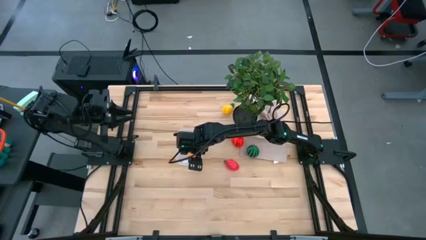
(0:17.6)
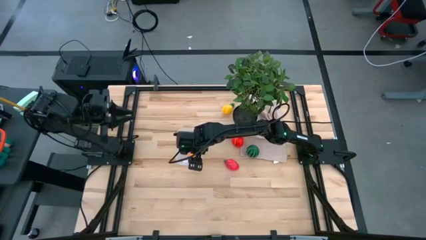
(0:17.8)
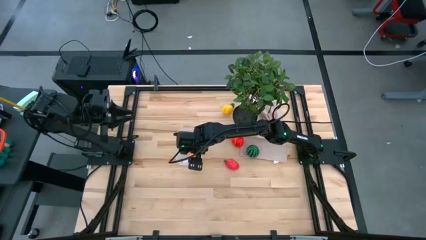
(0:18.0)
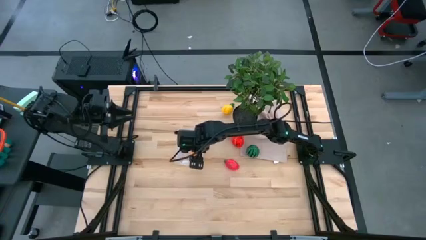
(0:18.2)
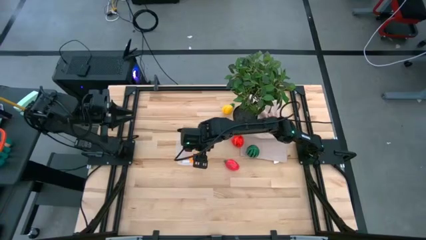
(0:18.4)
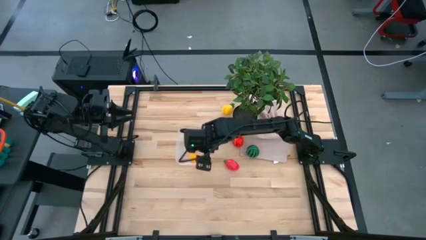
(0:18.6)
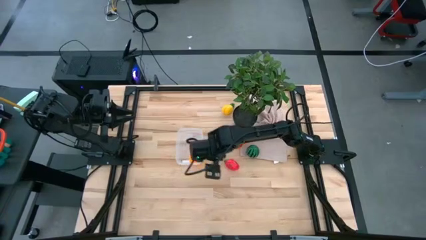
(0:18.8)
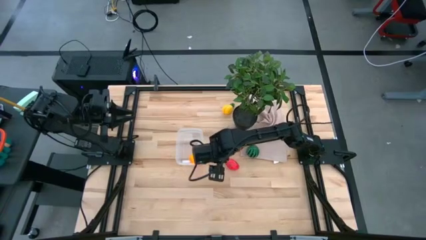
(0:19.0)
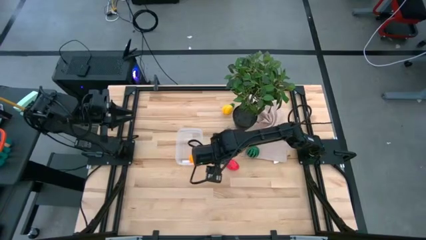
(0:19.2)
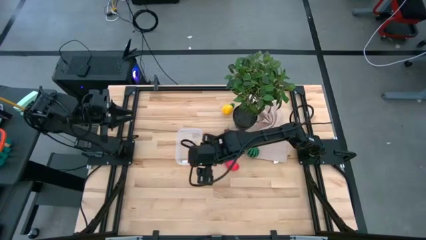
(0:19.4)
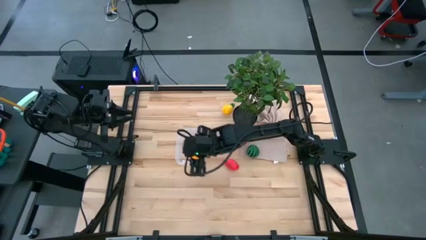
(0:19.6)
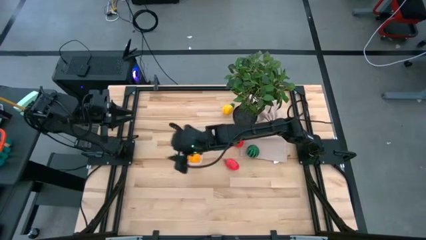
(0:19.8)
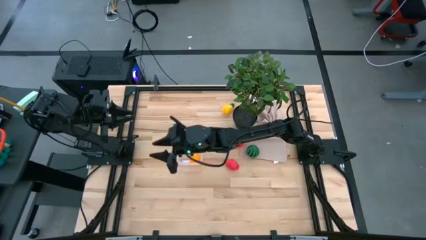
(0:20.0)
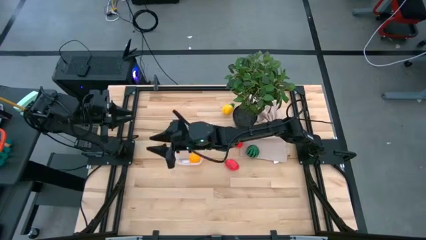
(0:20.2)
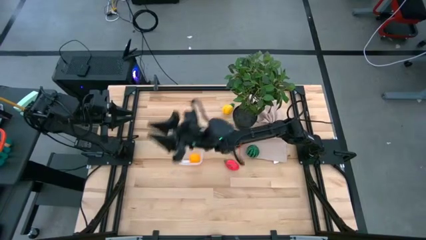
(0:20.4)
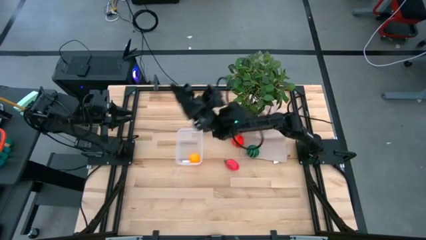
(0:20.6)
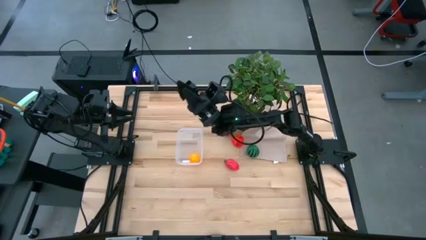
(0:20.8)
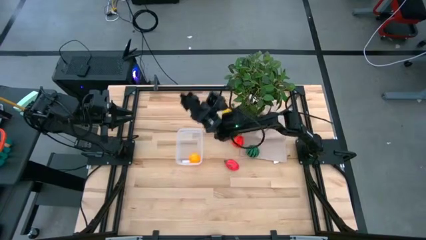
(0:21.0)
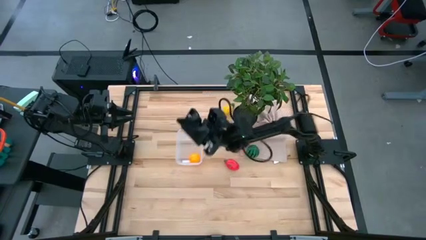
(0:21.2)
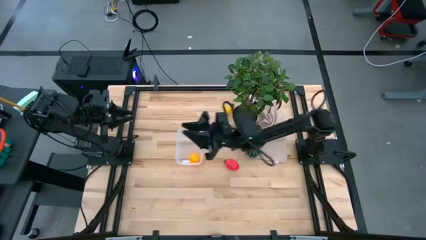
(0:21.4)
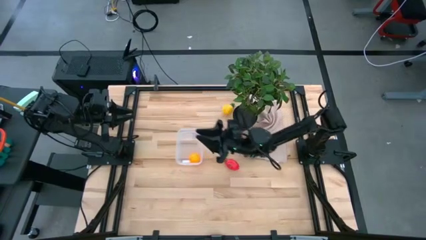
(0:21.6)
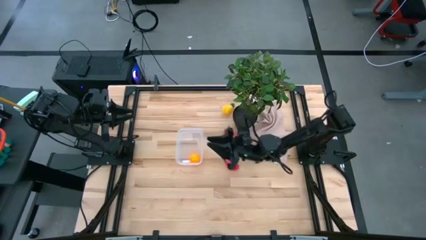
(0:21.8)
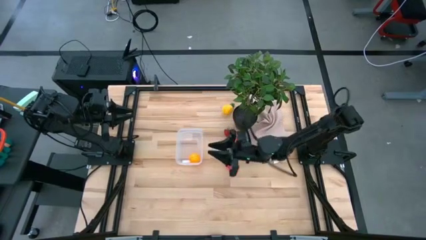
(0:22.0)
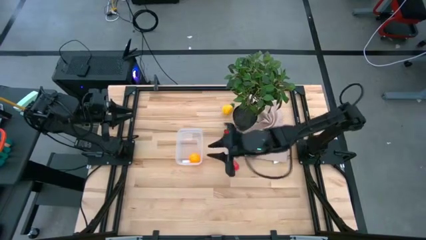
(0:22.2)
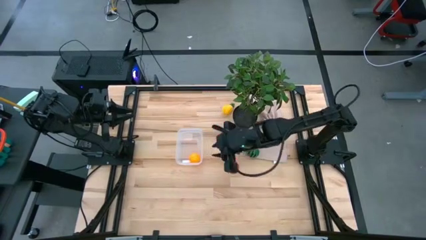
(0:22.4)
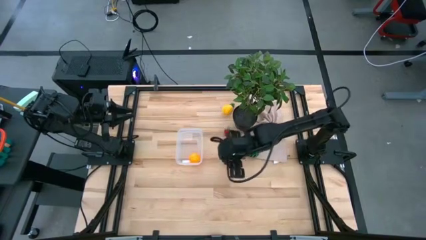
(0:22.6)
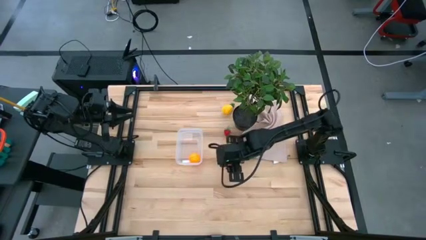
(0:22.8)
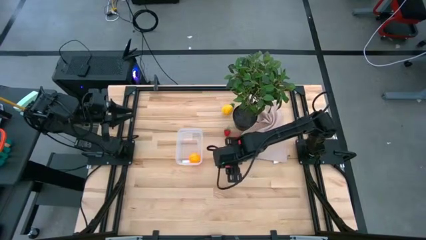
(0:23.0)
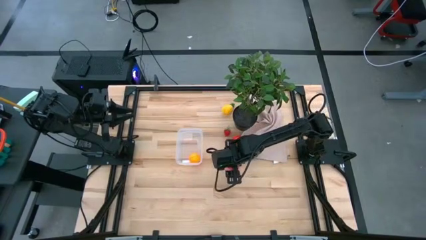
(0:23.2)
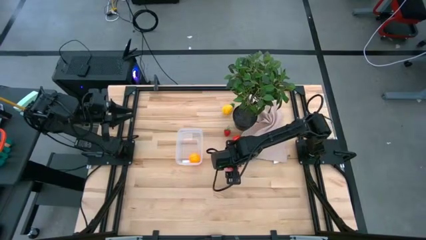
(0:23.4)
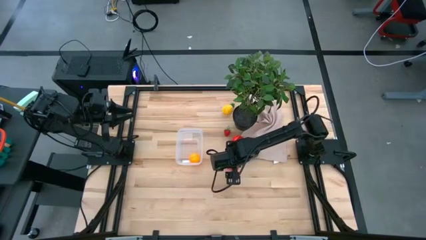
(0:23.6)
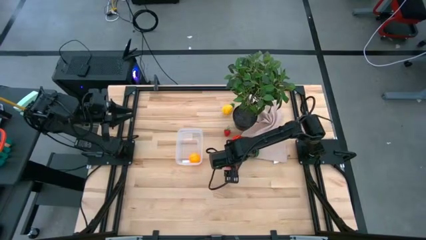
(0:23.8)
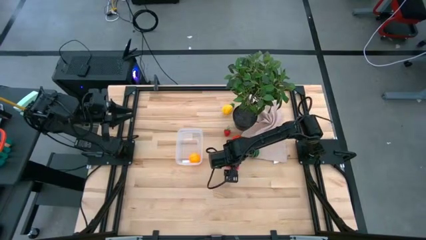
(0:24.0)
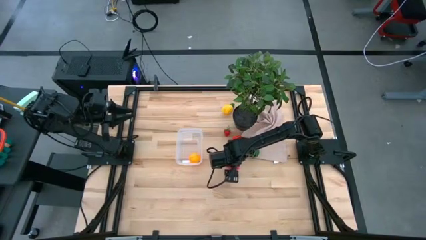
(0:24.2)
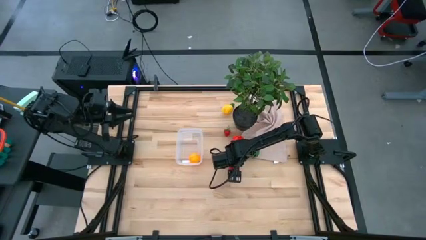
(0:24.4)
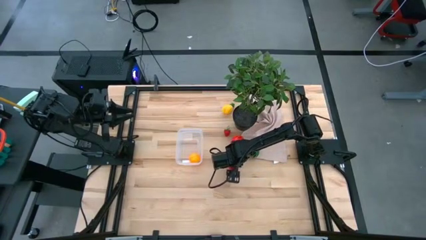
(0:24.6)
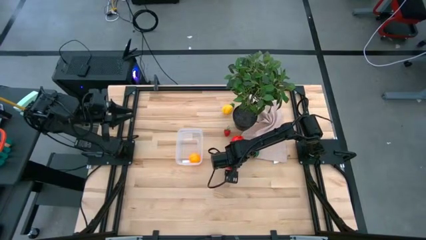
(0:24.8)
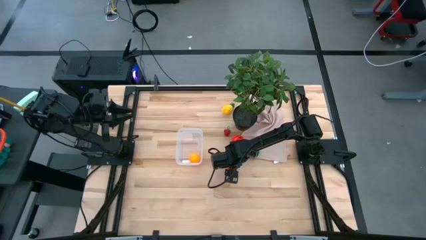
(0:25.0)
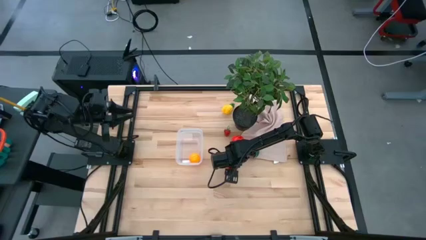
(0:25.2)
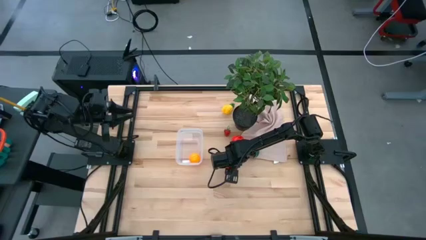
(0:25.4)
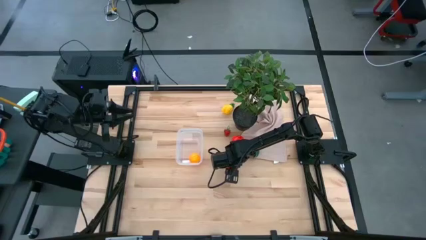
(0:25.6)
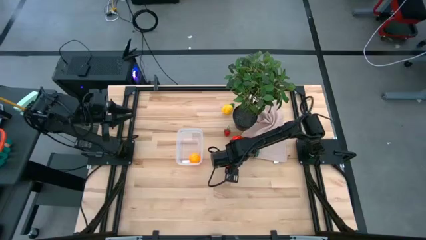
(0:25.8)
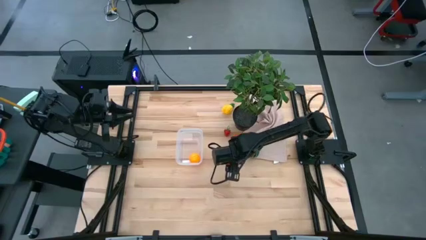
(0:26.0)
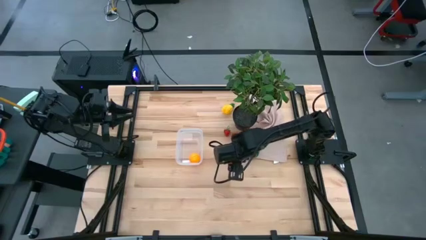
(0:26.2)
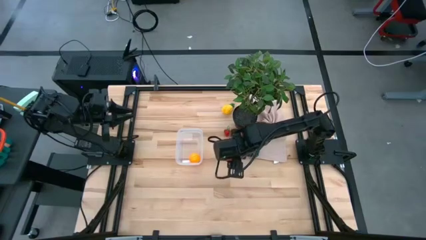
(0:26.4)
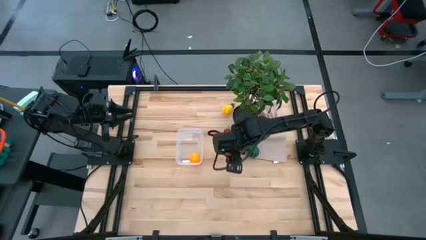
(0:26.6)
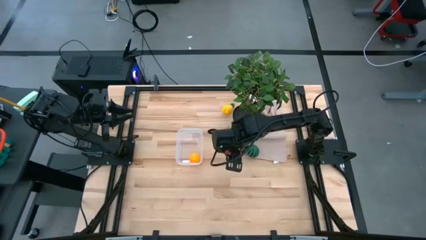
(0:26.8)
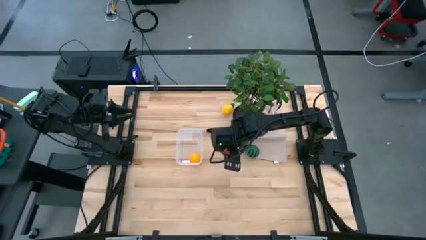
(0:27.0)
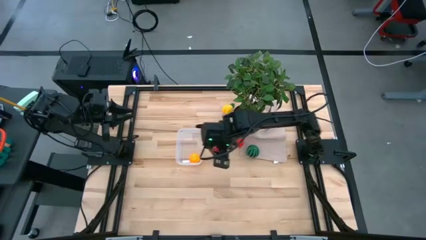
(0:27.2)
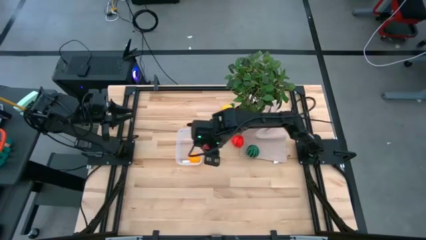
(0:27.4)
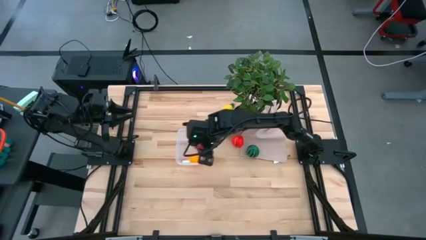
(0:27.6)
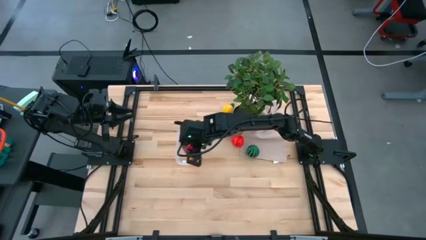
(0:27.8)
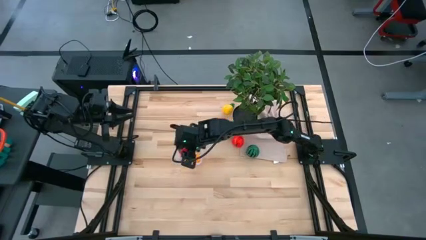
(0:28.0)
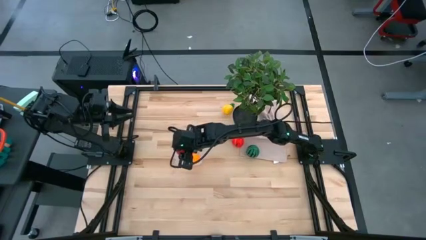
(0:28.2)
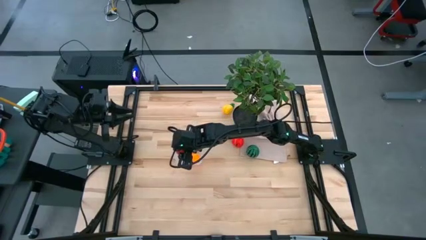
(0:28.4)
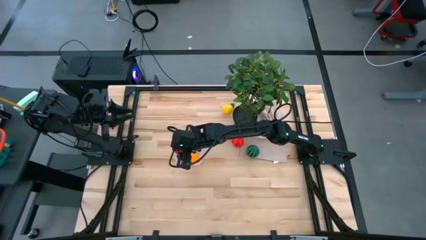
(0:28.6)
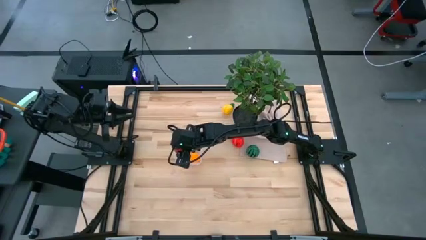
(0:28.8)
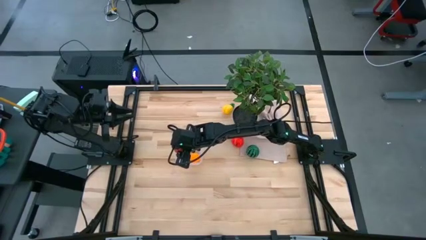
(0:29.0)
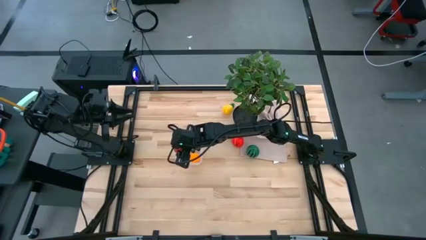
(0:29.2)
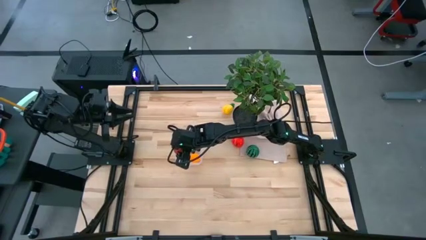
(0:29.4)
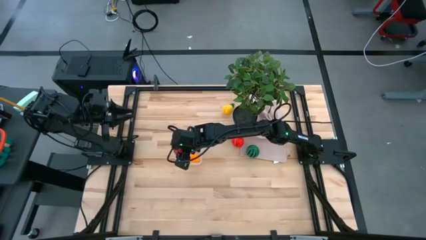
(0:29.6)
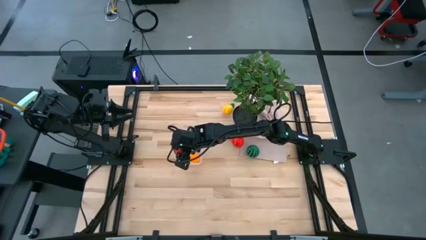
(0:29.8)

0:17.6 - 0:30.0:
Task: Pick and placing Produce into tupperware
Put the red dragon fruit into the transparent bin

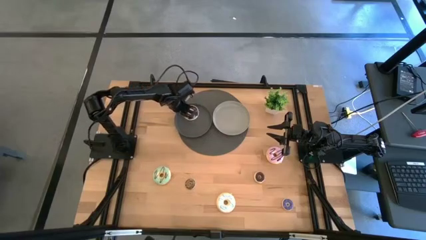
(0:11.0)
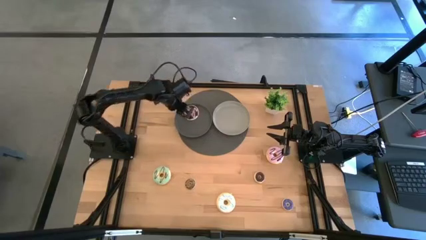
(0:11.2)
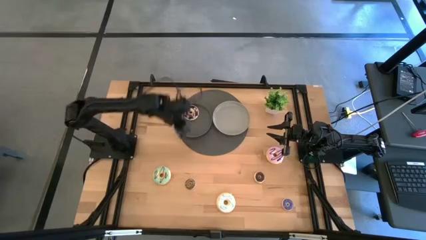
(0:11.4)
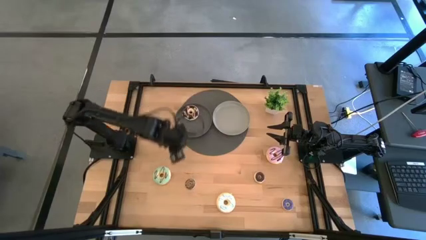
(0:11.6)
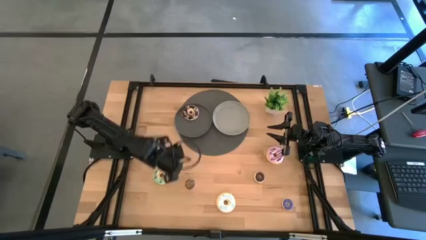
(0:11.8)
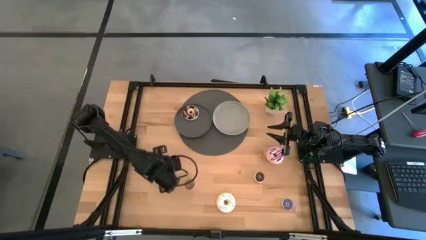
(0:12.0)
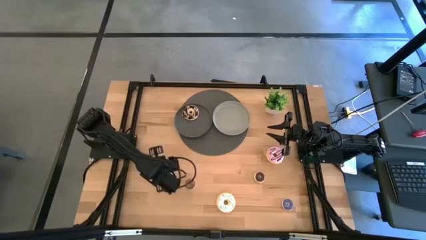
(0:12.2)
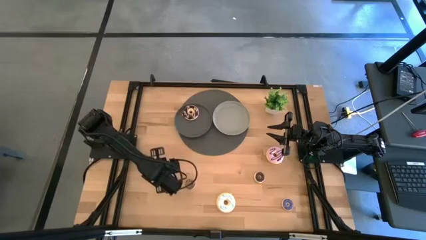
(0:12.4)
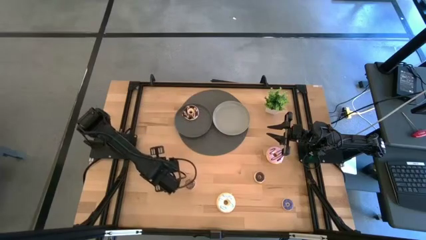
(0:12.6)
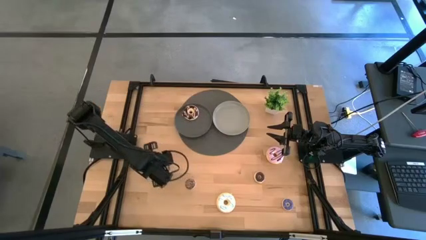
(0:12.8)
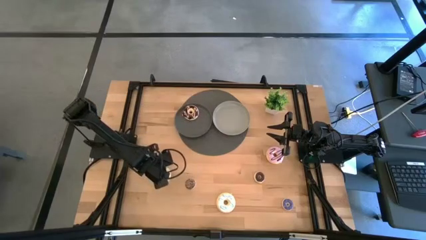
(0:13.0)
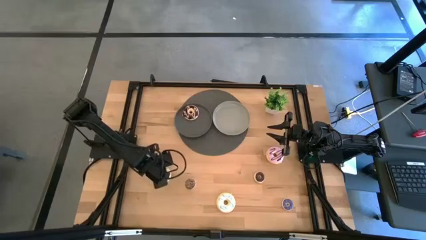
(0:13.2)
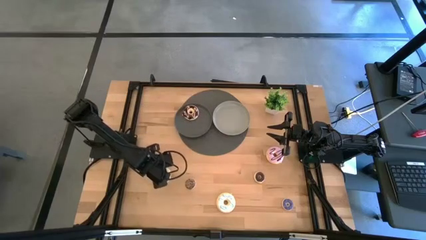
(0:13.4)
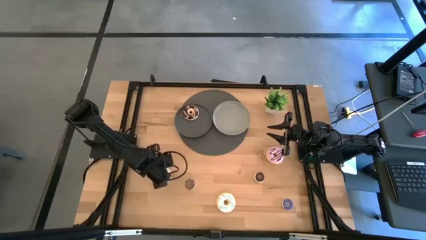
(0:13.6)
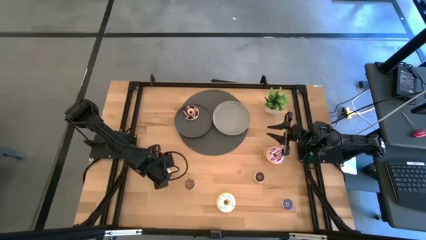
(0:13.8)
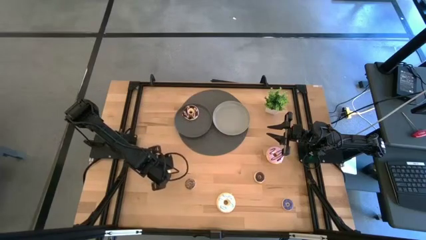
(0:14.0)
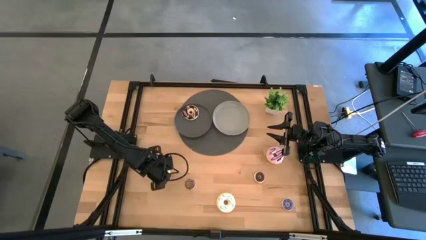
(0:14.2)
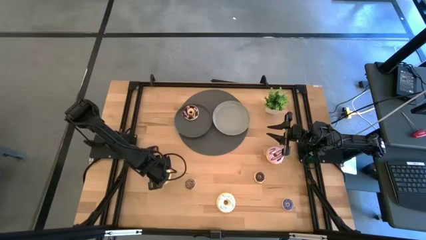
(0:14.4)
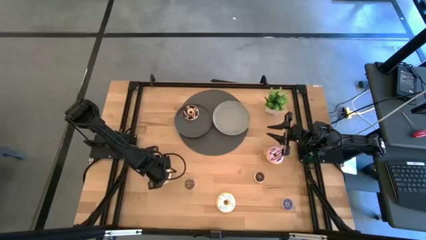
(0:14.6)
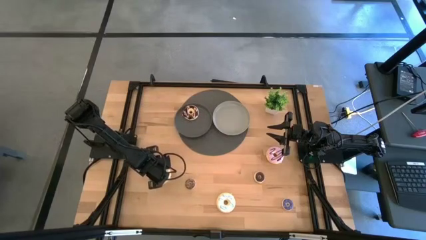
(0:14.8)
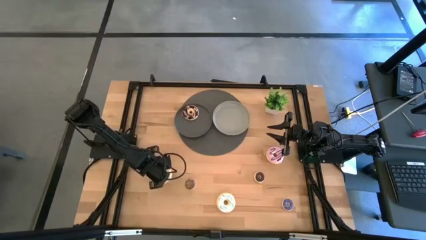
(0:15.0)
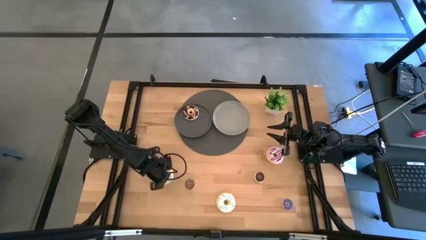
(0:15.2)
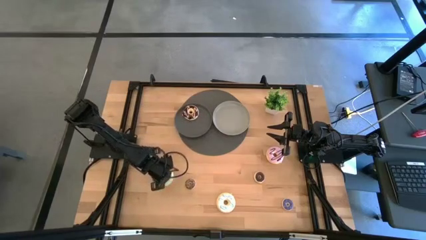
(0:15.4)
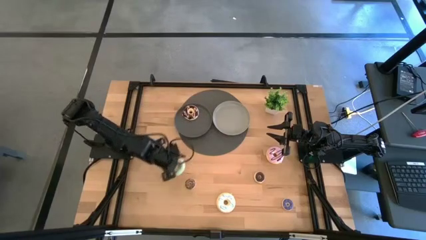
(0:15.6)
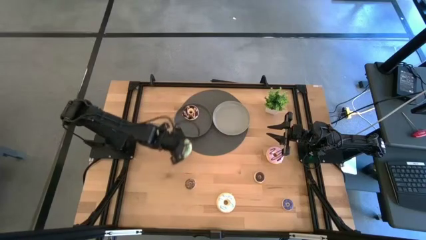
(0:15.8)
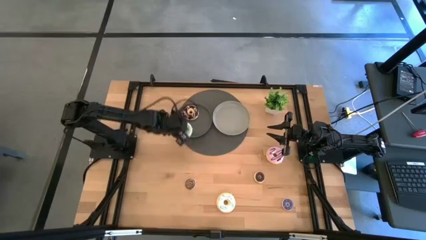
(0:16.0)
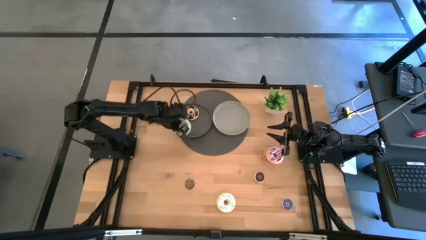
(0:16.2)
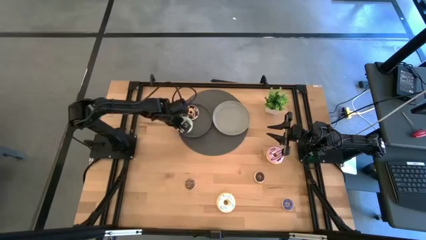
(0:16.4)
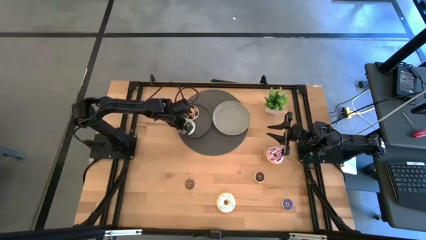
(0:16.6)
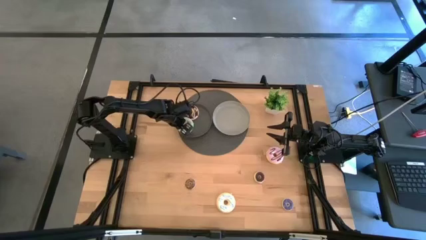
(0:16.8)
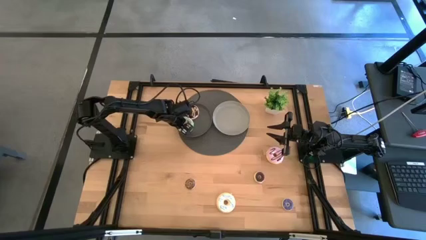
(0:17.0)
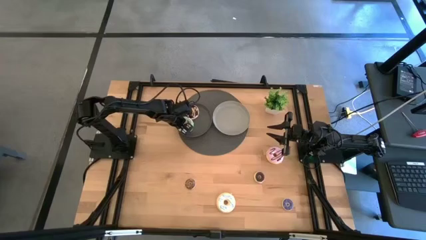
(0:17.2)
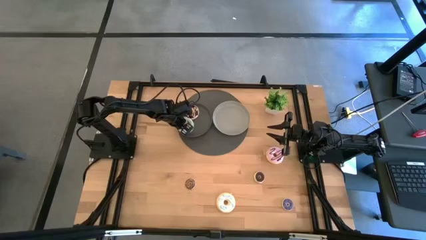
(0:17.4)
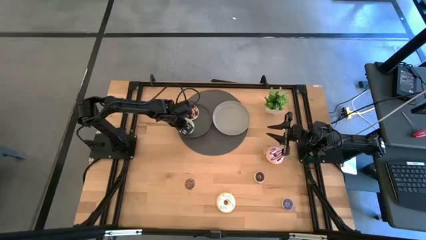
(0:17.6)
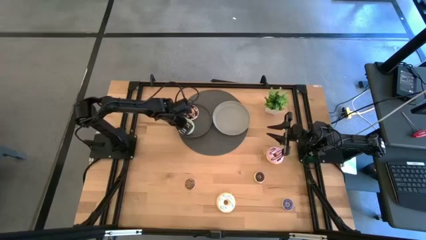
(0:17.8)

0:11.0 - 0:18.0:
Task: Pick & Place donuts
Put the big blue doughnut on the dark gray plate
